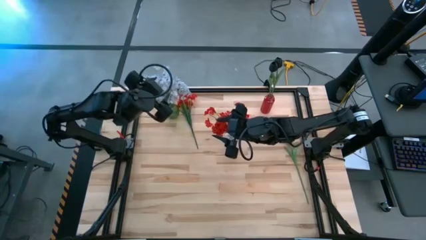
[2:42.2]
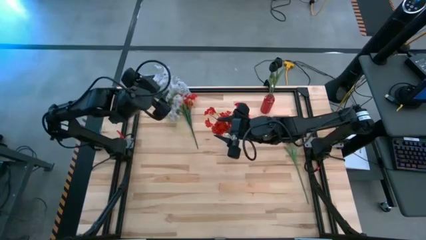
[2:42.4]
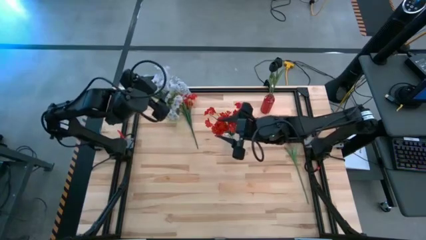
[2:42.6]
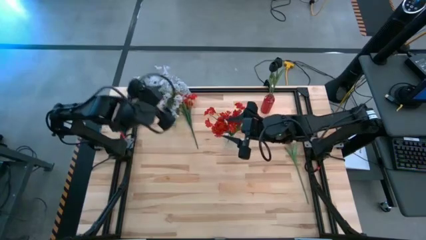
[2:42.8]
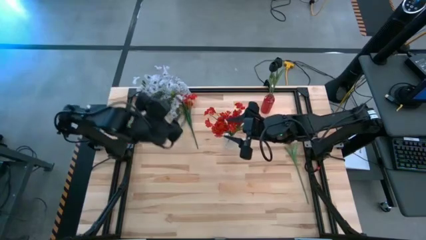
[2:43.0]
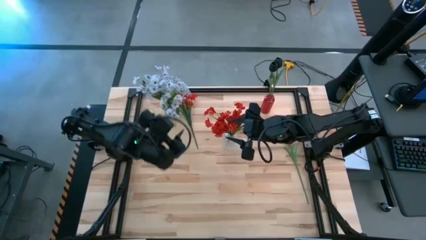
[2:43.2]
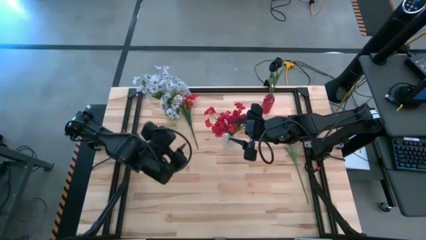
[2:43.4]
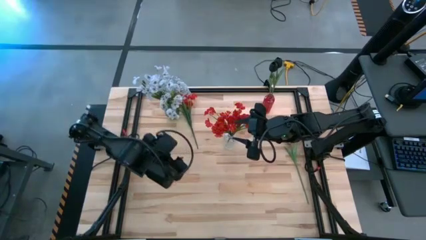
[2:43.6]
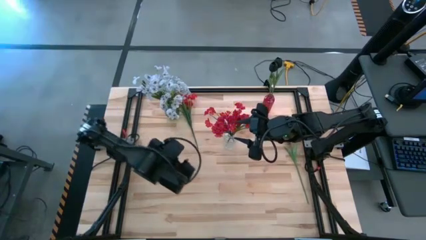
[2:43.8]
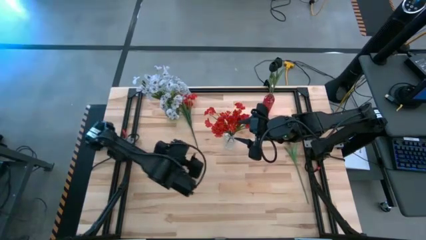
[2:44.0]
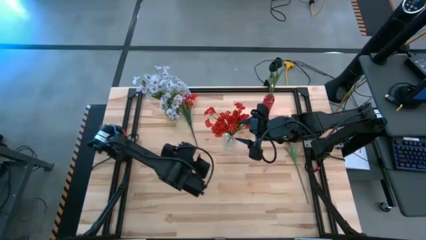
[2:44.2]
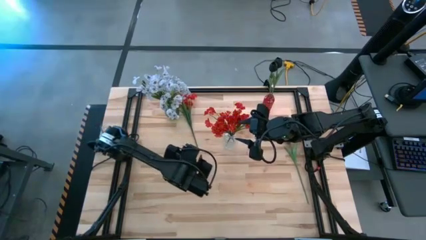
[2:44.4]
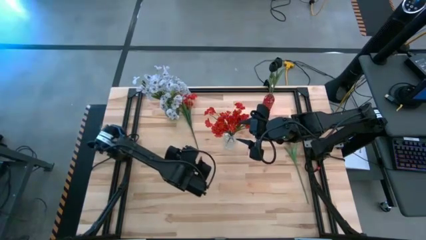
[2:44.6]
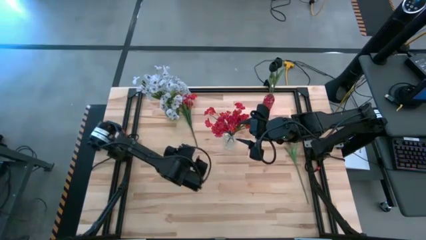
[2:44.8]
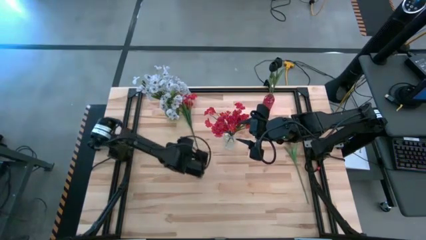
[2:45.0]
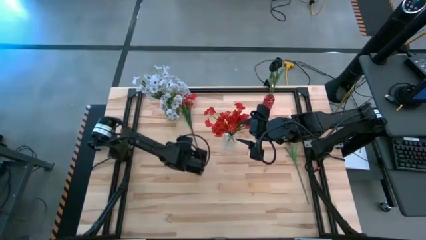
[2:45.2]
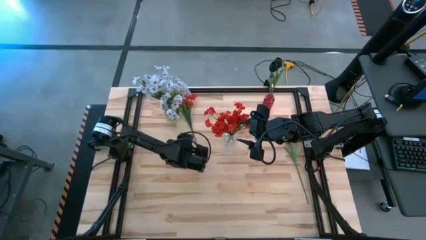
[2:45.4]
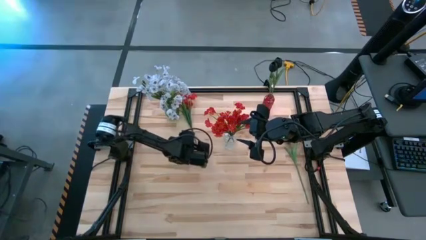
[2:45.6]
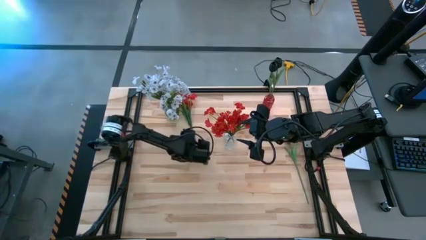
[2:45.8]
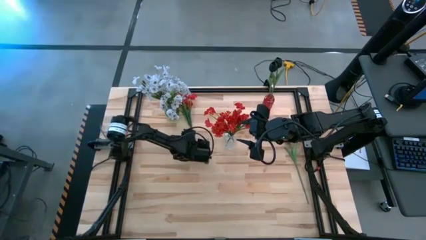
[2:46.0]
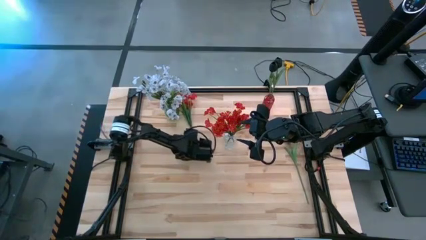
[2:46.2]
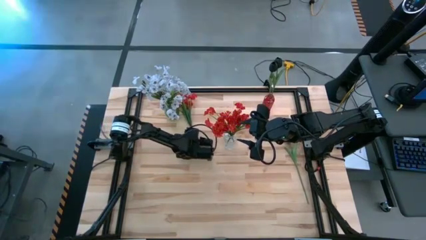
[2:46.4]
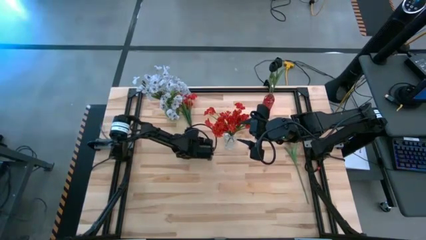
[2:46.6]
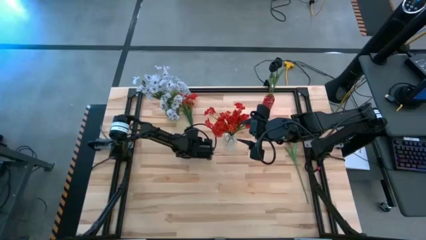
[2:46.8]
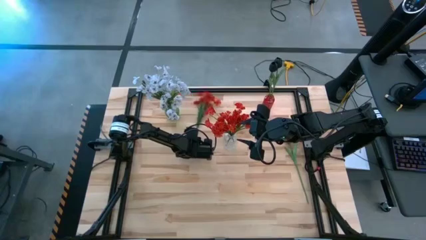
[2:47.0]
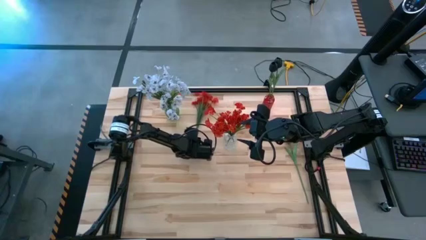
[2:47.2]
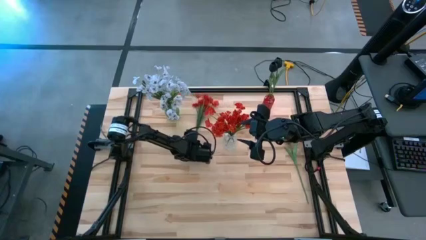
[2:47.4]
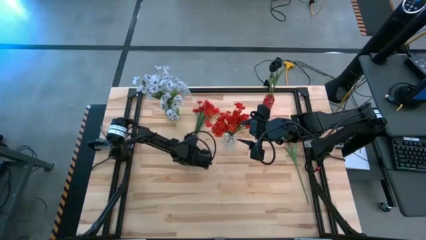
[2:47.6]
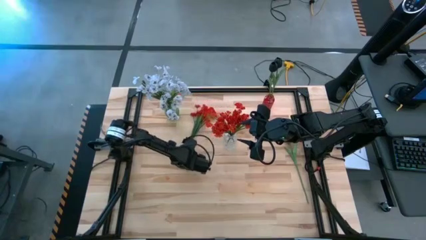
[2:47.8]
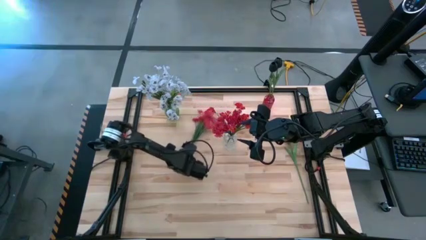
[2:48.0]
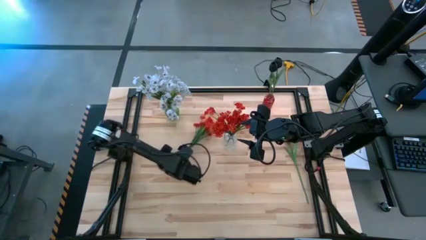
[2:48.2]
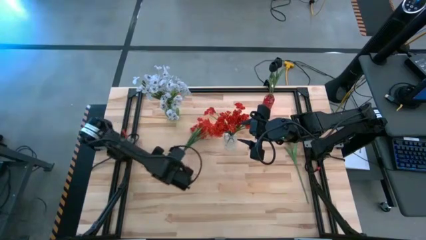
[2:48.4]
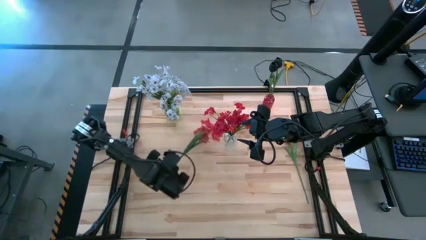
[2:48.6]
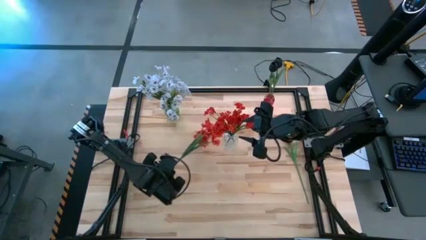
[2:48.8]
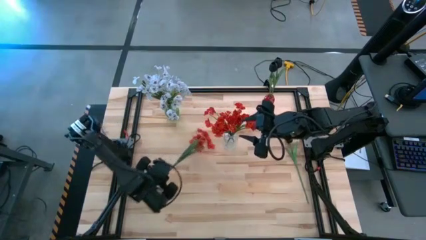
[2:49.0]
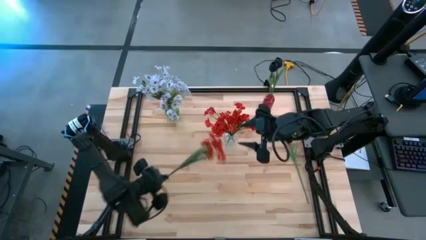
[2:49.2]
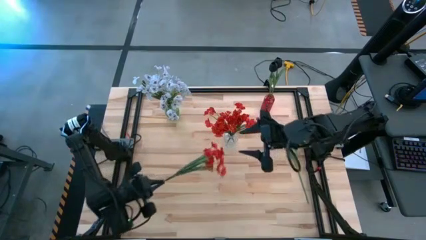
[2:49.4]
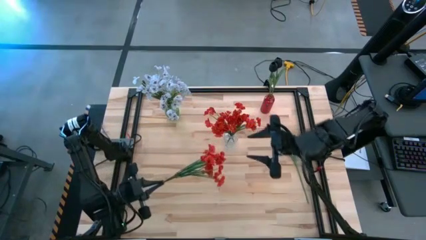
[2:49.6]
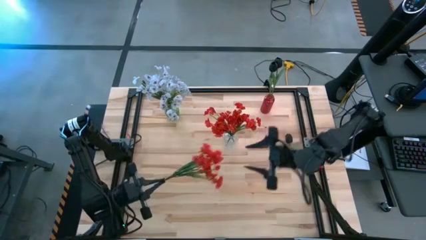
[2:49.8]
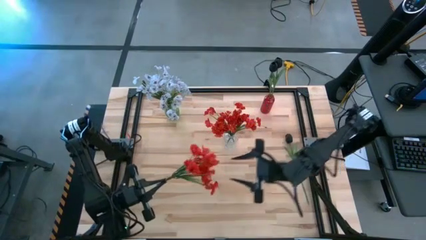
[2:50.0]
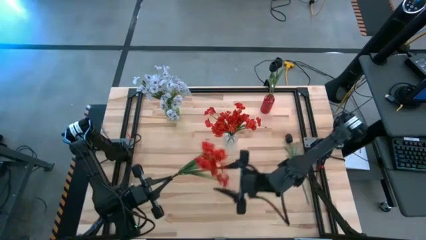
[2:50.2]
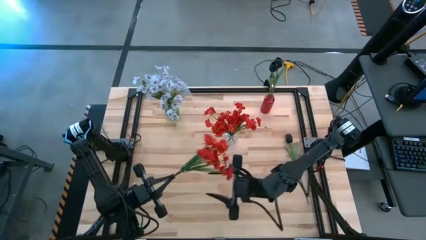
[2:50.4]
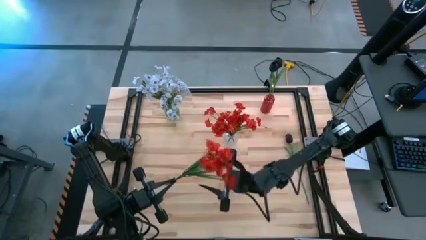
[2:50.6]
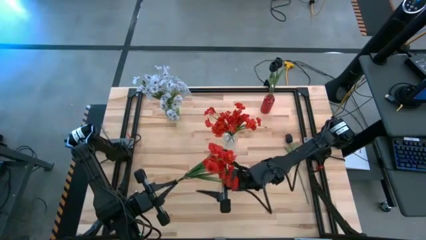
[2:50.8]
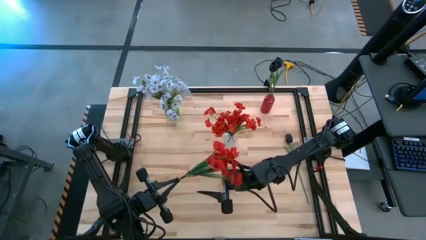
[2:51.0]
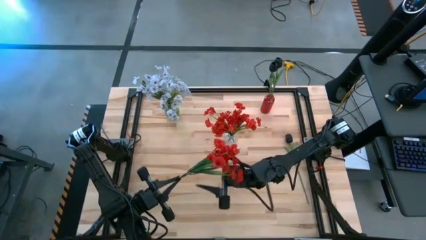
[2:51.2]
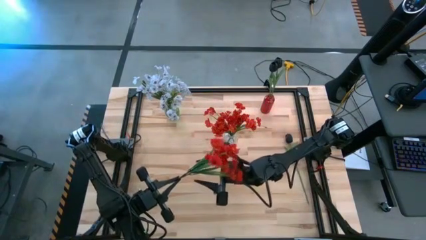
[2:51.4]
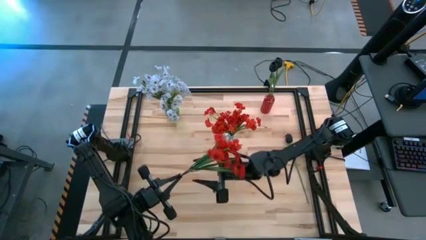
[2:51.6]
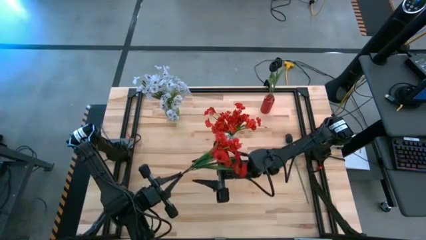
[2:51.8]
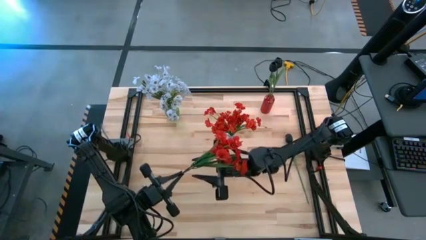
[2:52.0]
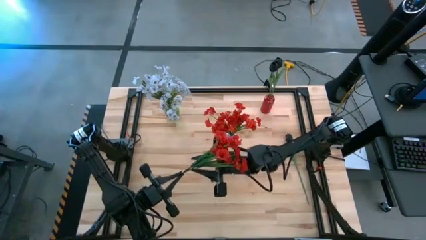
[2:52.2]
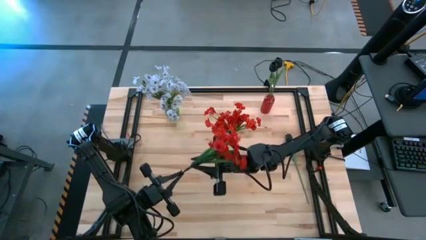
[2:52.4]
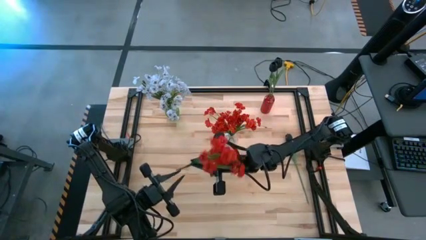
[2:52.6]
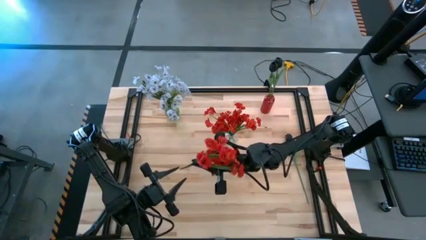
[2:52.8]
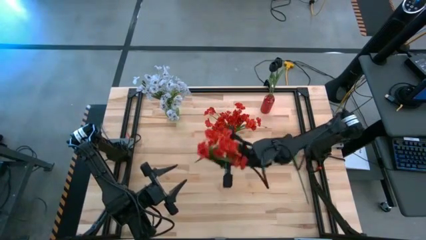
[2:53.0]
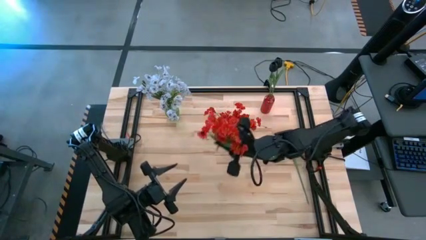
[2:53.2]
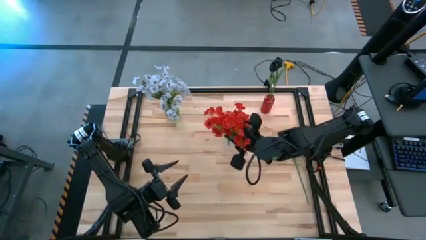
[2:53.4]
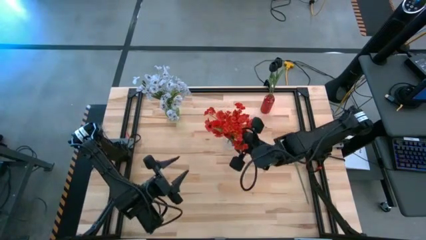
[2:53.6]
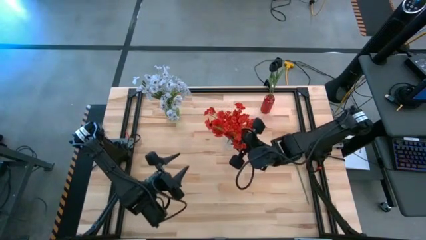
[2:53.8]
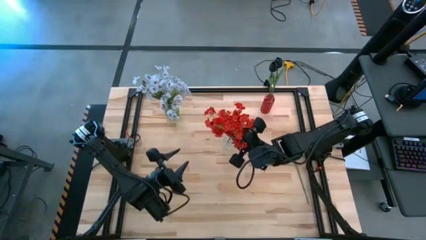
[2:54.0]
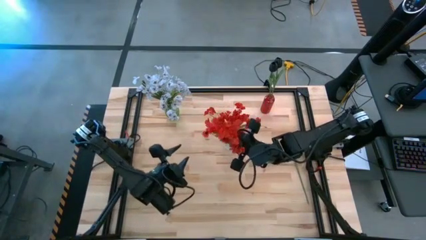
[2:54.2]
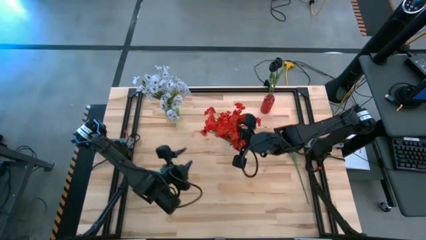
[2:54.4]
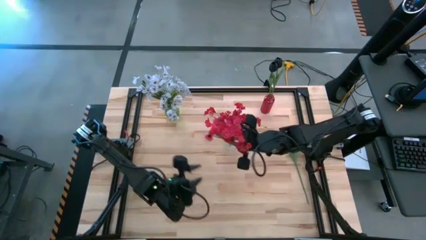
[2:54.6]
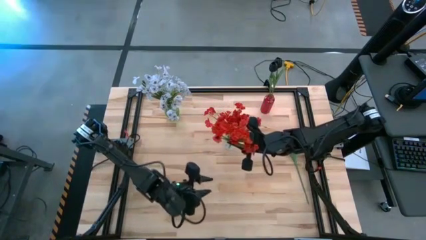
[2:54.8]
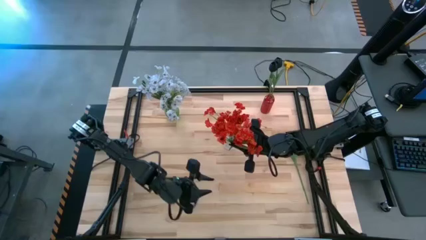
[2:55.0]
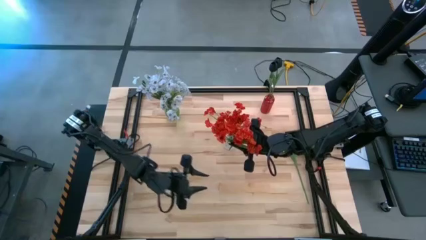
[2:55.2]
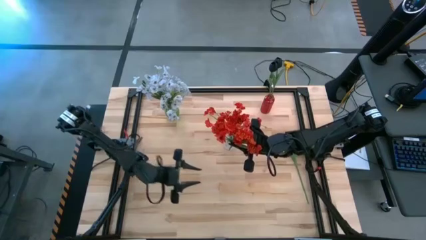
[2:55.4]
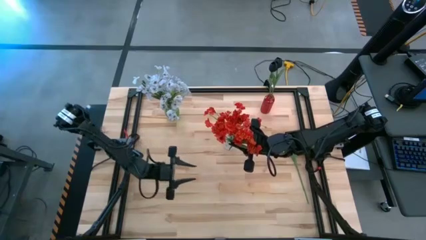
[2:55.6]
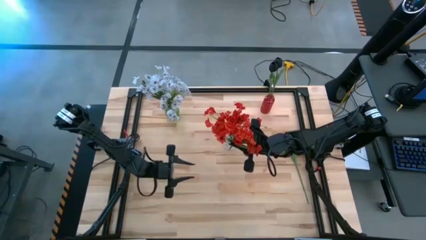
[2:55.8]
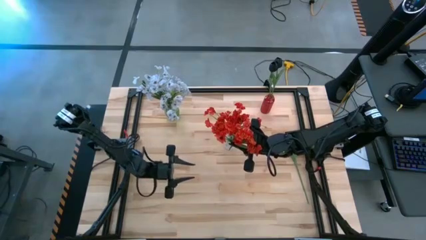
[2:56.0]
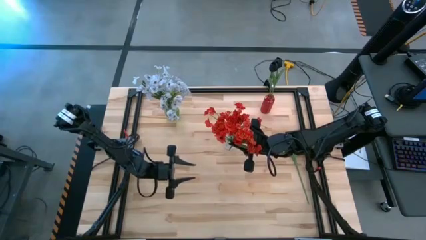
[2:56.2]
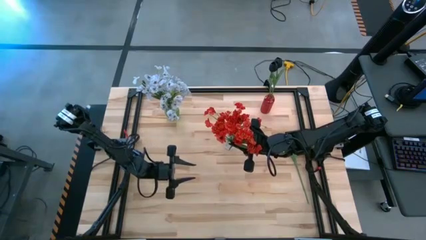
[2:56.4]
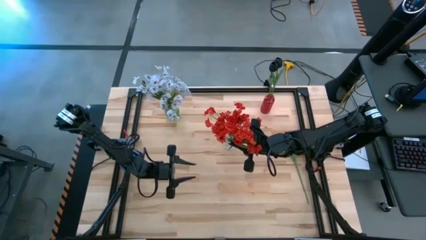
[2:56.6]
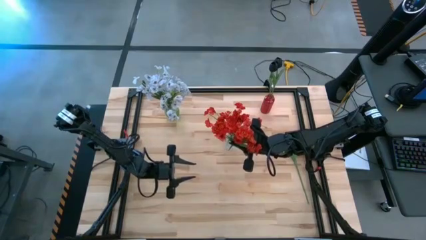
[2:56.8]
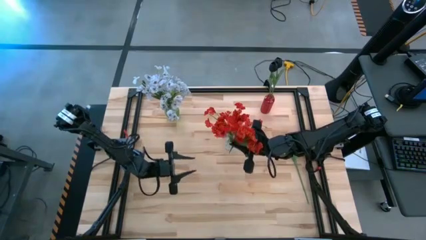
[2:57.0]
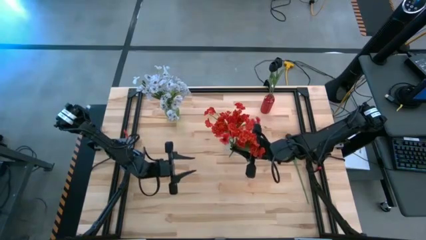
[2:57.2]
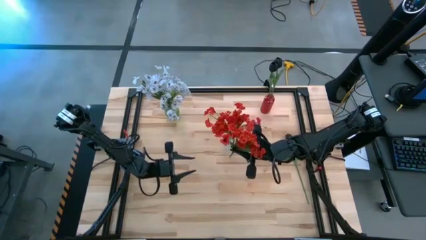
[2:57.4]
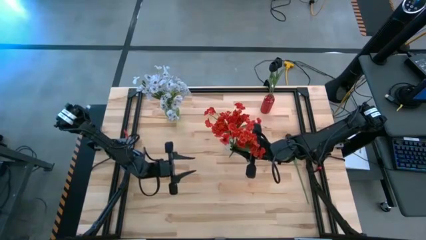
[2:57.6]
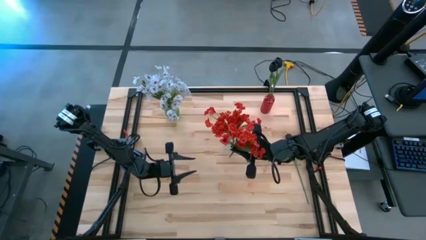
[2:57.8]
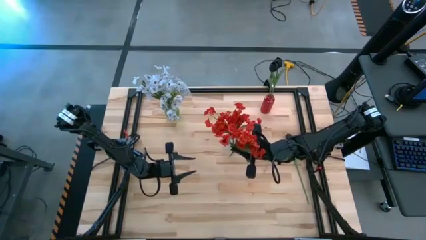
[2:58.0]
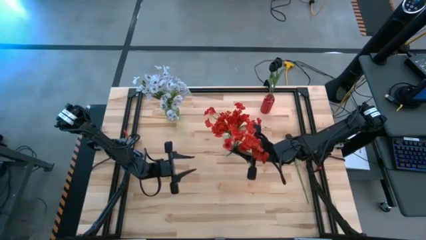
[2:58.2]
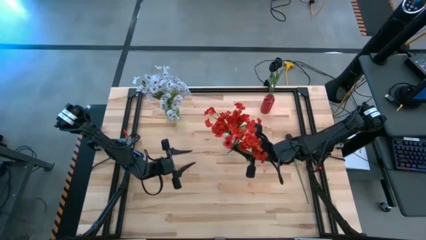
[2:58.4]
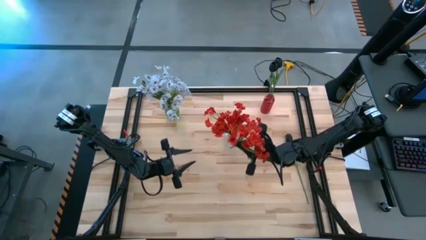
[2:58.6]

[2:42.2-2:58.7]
Task: Sort flowers into vase by color
Put the red flower into the transparent vase
